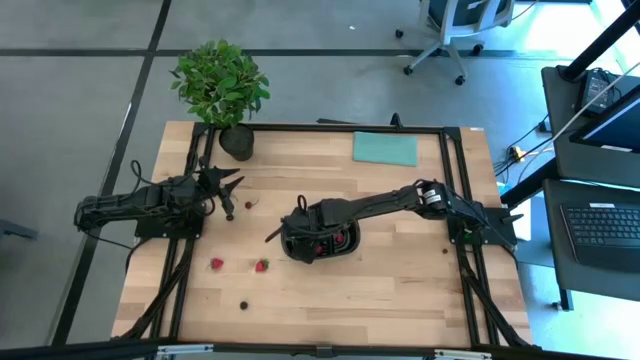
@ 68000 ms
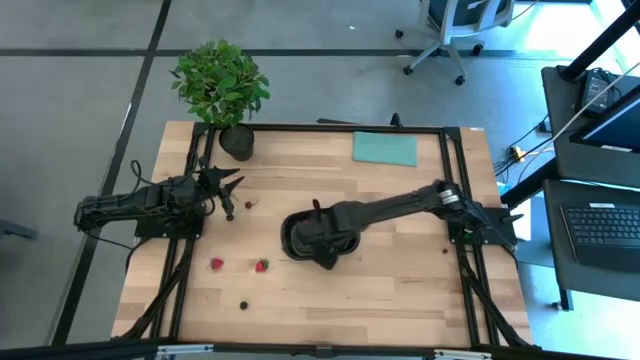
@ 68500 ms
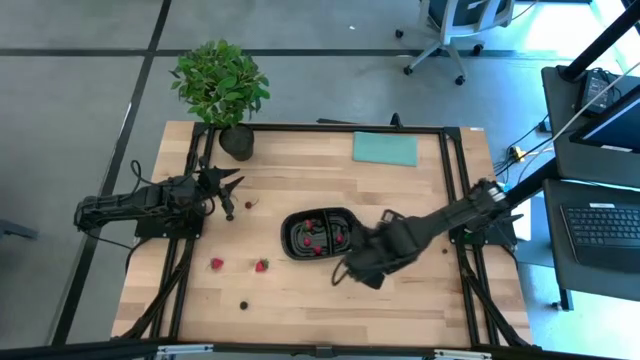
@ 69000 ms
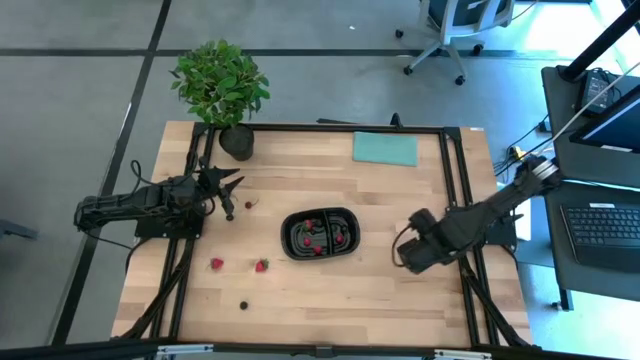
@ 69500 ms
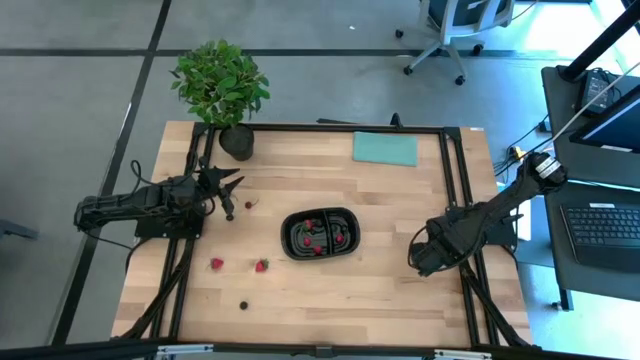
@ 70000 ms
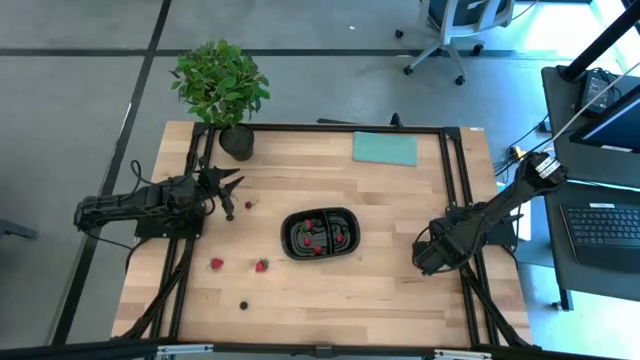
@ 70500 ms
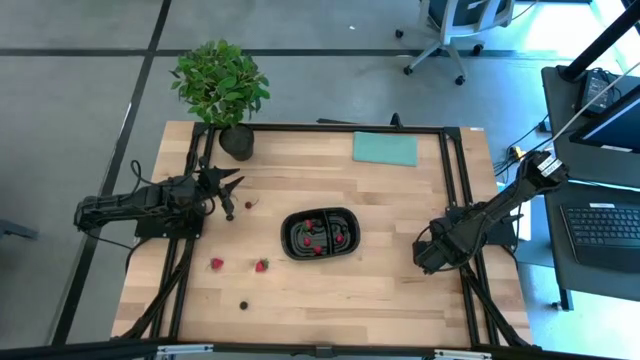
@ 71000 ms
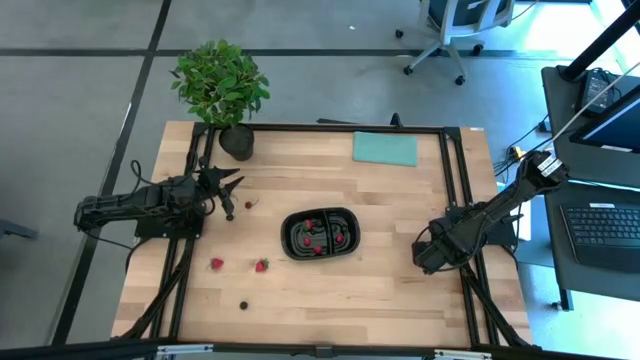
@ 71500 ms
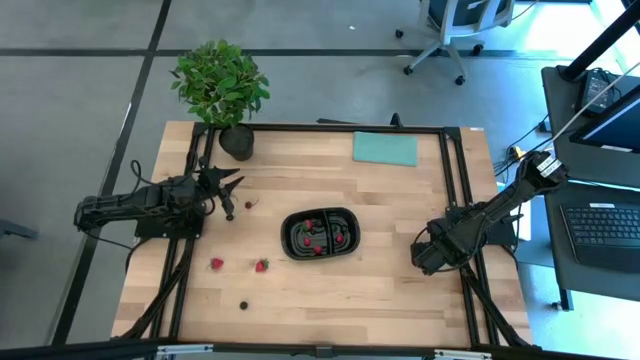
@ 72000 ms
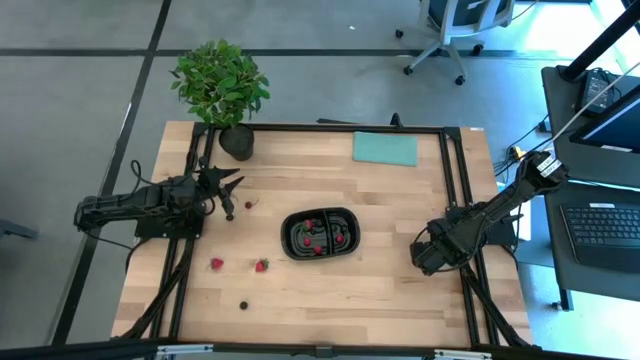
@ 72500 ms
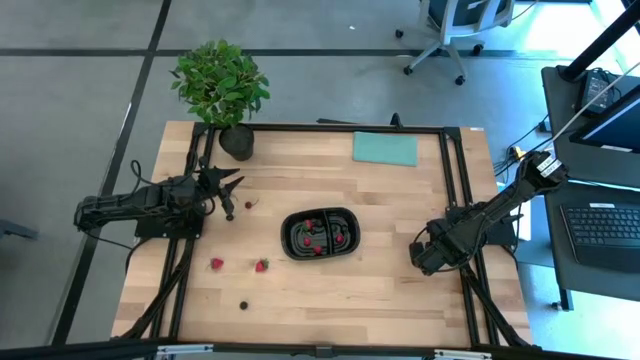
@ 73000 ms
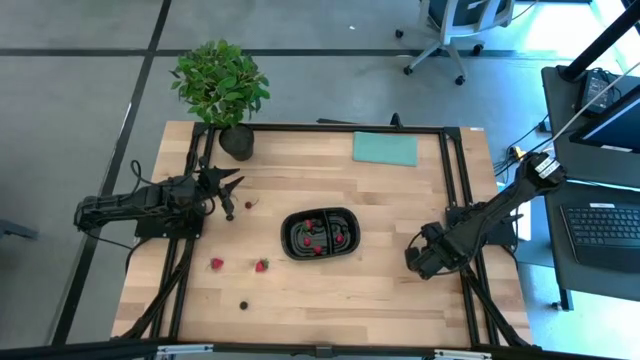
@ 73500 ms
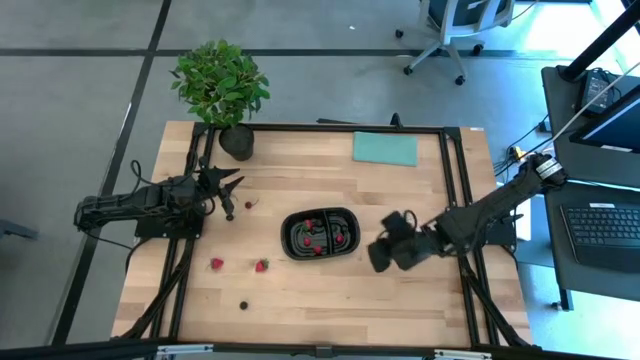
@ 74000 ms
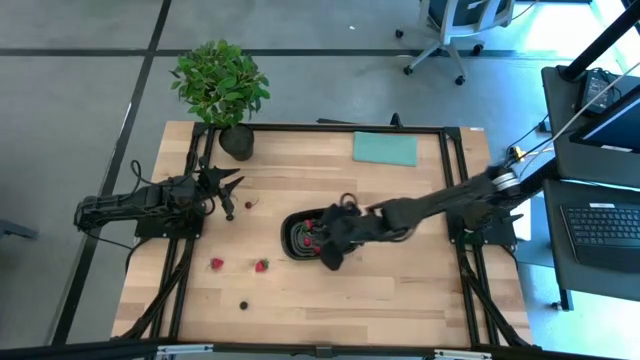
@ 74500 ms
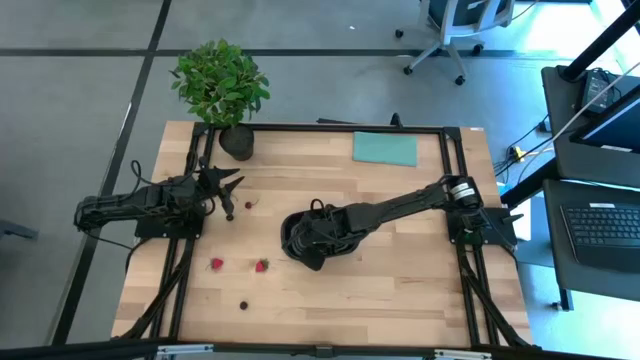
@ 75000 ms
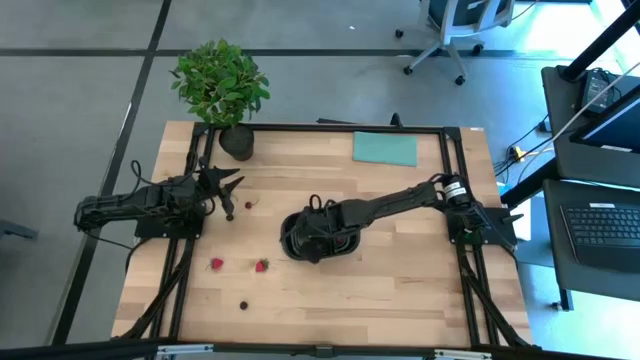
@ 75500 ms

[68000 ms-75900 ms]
Task: Pick and placing Produce into tupperware
Put the blueberry into the left section of the black bin

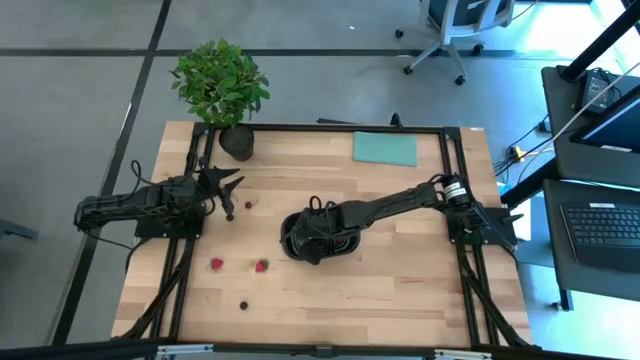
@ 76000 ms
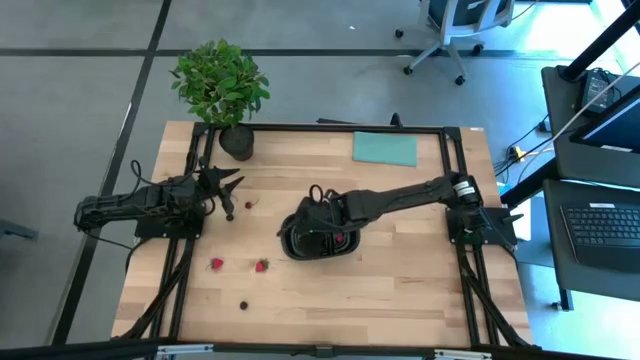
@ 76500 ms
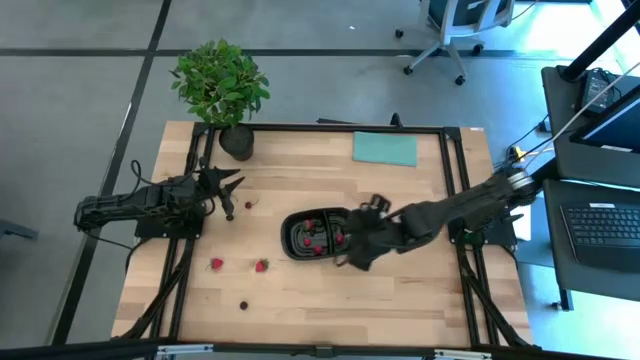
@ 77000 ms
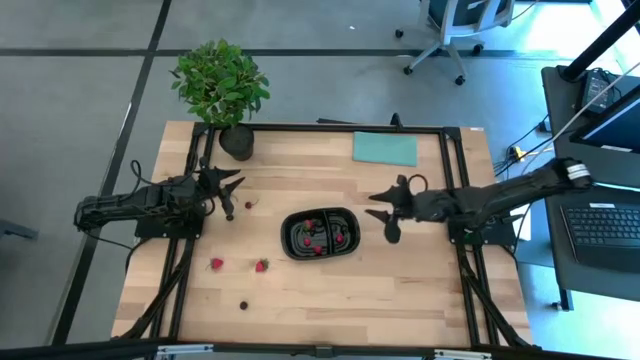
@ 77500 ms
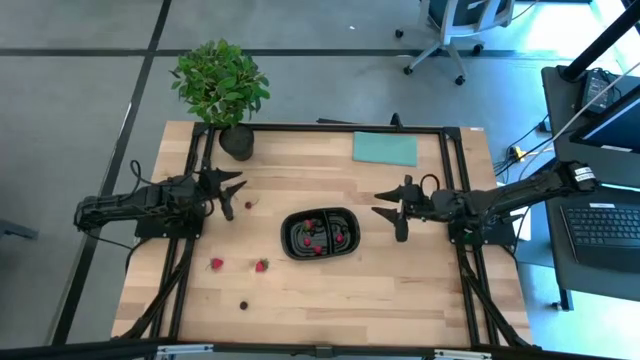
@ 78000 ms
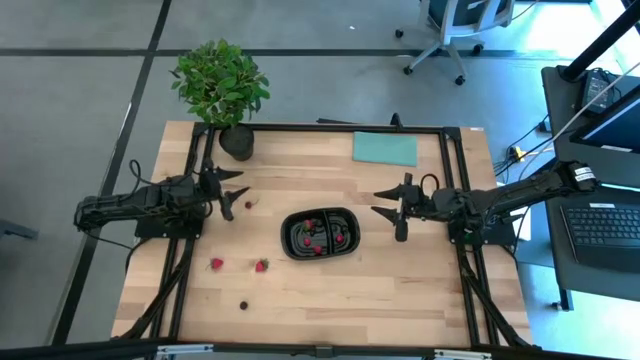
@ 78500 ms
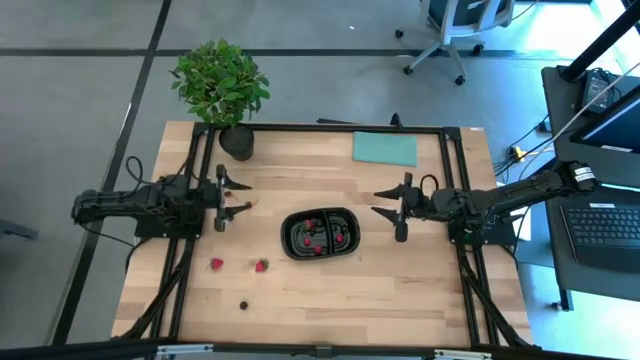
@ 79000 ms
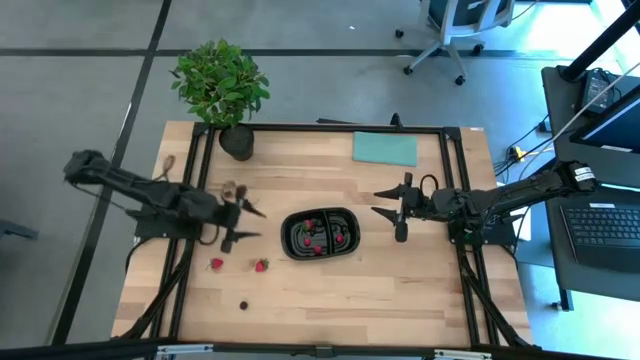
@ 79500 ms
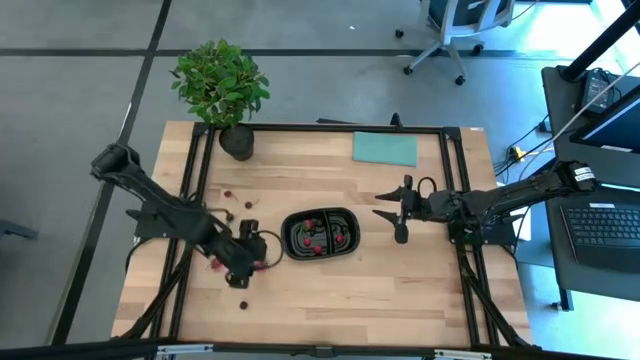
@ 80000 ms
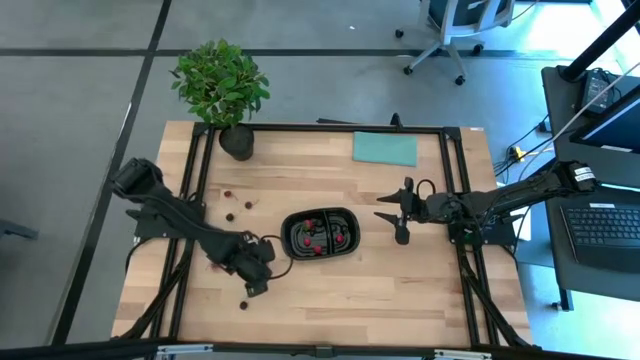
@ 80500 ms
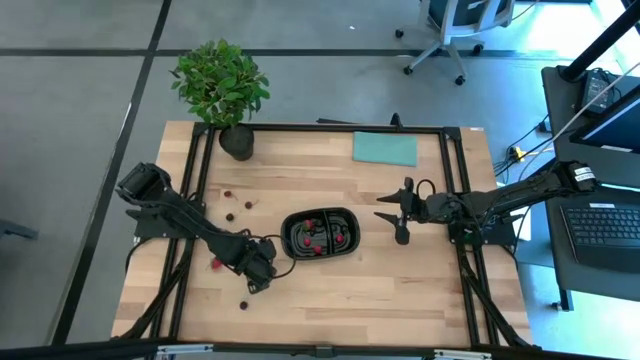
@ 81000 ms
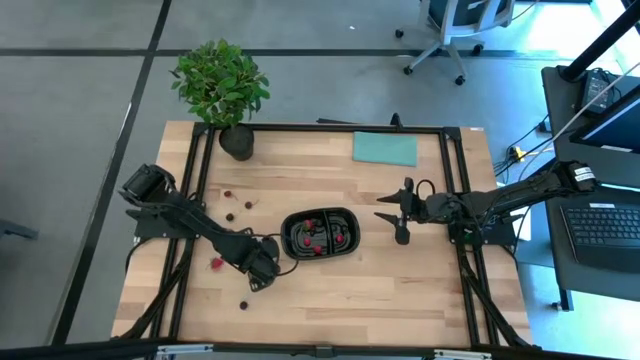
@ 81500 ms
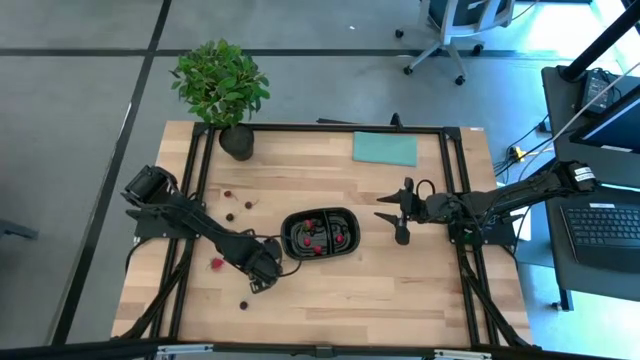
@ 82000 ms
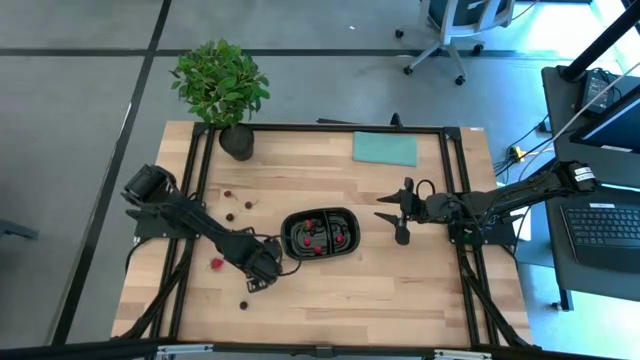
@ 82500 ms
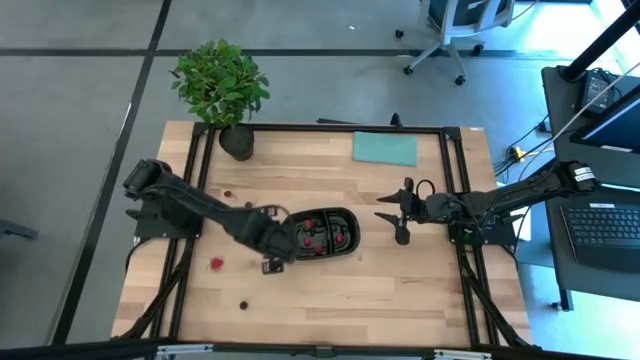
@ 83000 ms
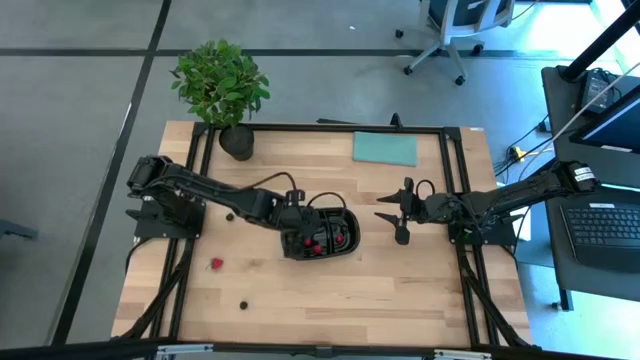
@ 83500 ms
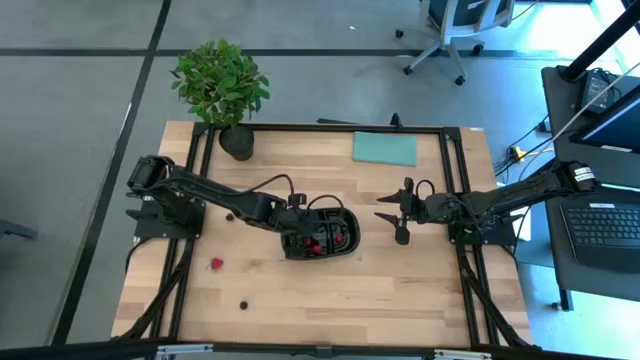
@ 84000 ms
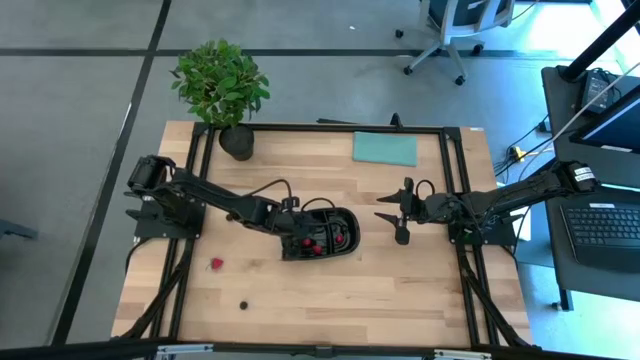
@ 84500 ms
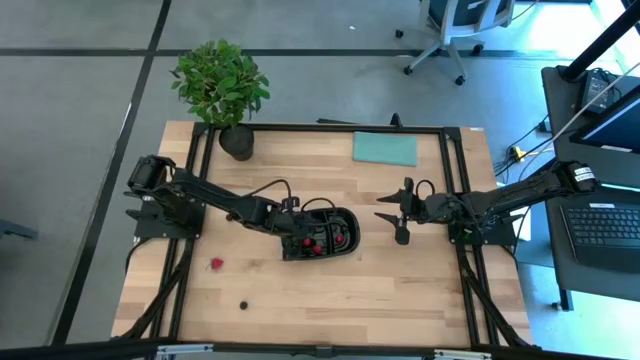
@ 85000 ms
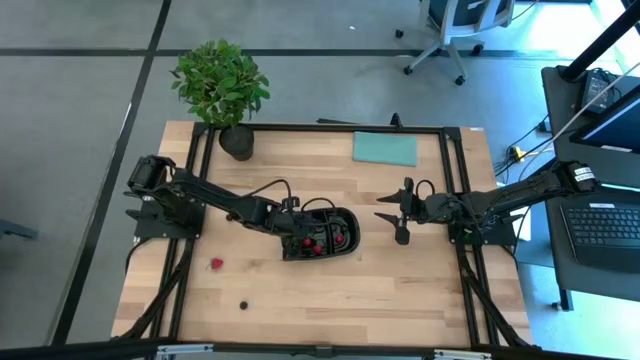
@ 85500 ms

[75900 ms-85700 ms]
Put the right strawberry into the left section of the black bin

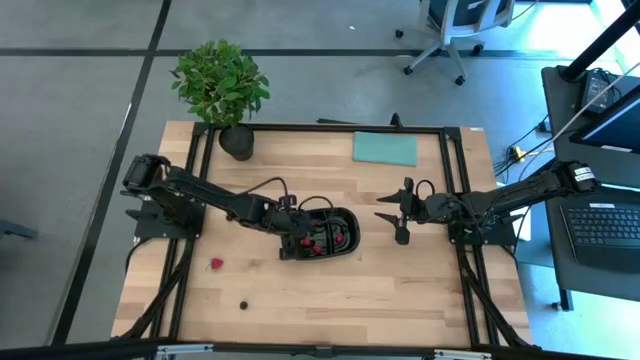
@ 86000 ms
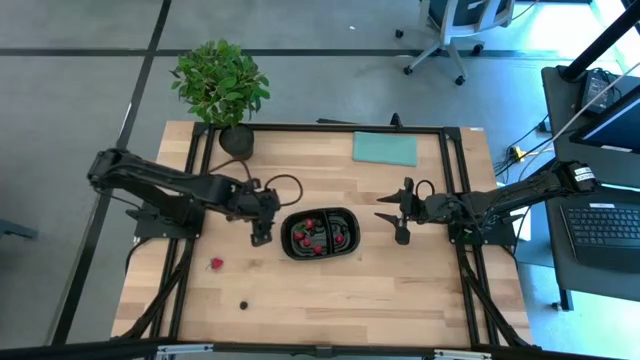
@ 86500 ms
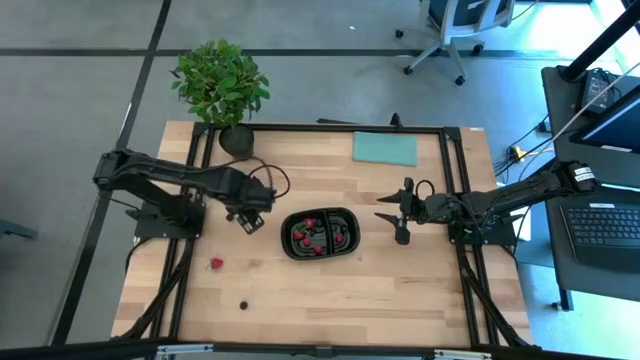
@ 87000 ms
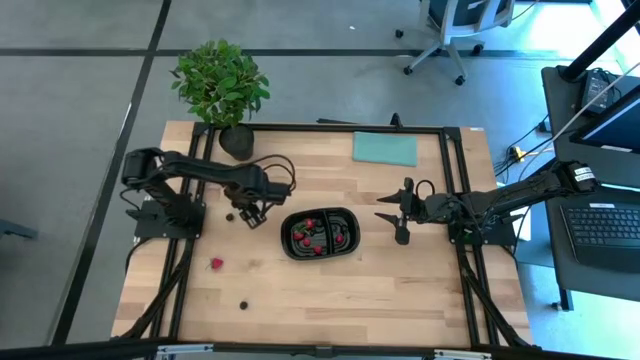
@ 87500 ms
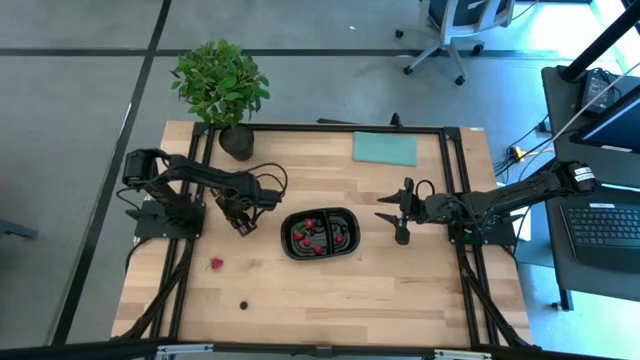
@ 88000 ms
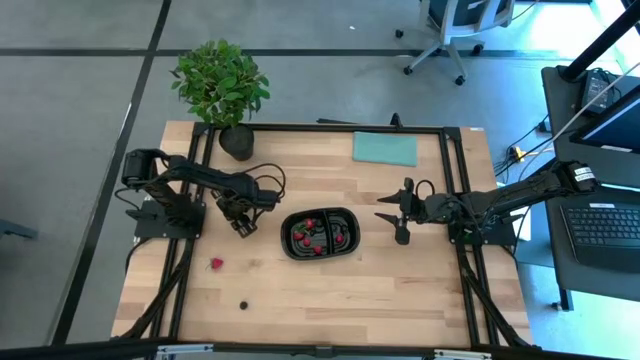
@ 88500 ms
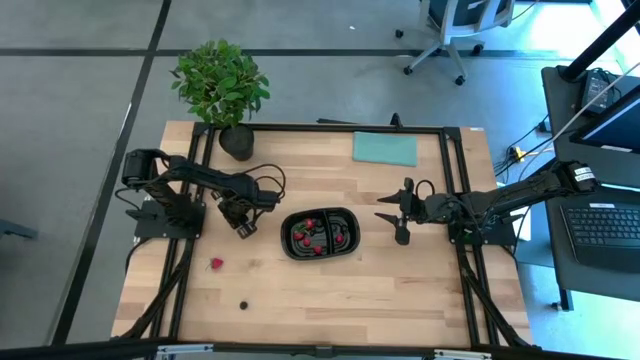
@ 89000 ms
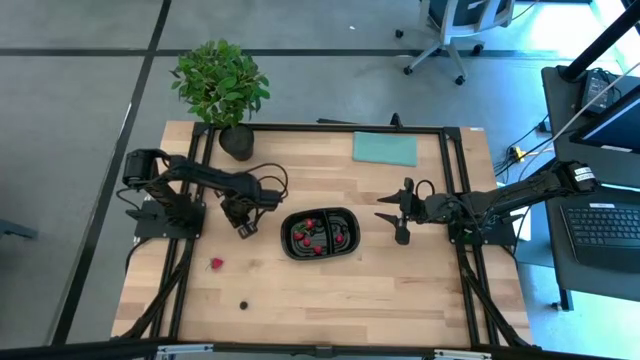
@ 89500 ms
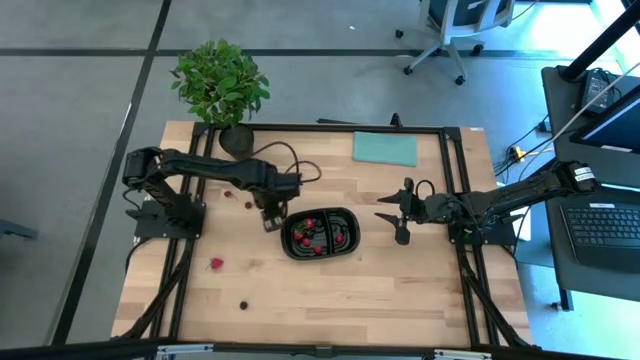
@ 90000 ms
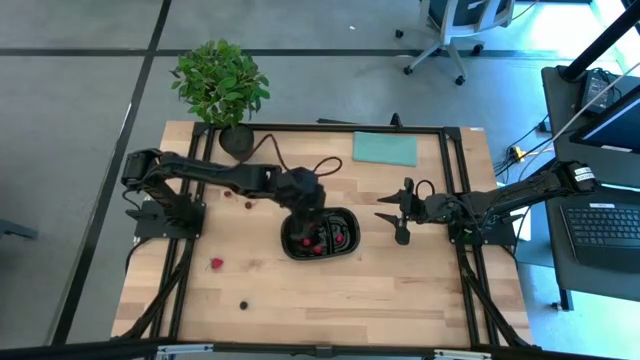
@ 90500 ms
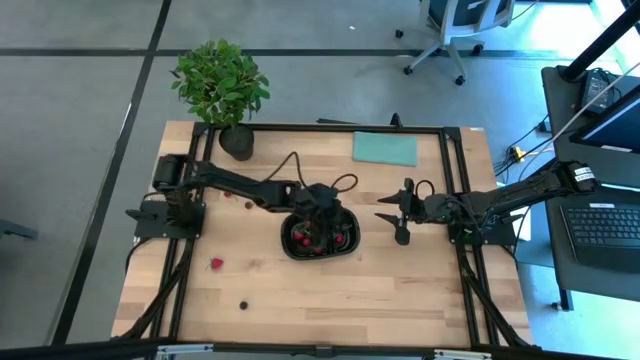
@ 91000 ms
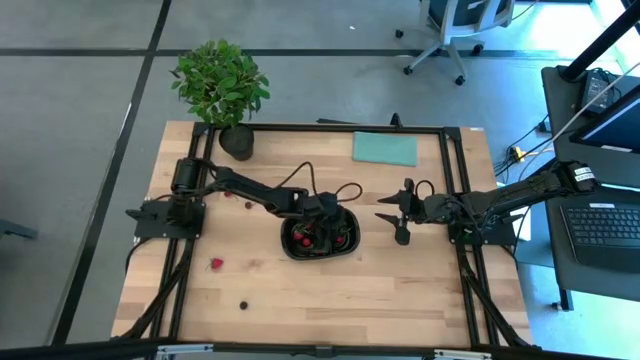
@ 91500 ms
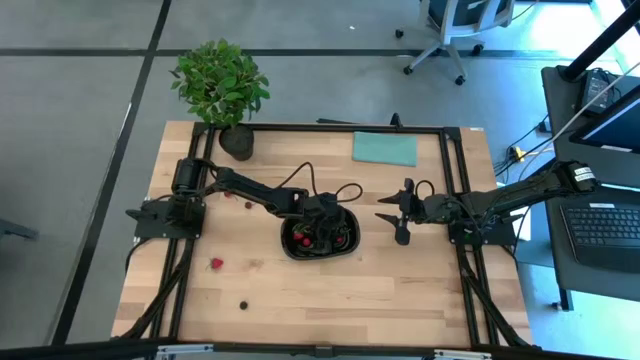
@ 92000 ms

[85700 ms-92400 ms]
Put the black cherry into the right section of the black bin
